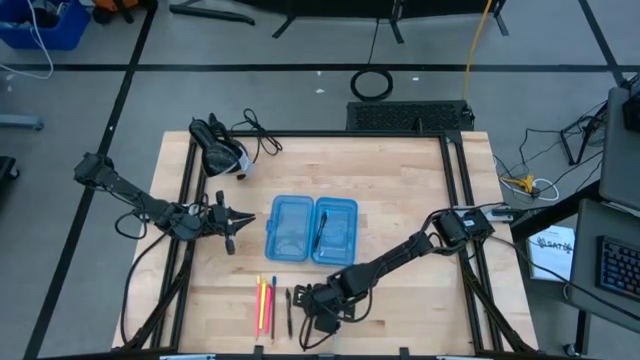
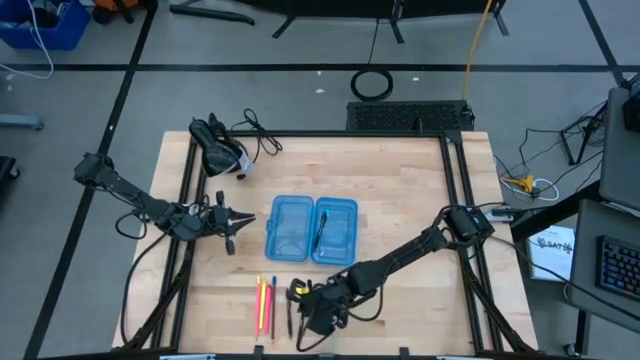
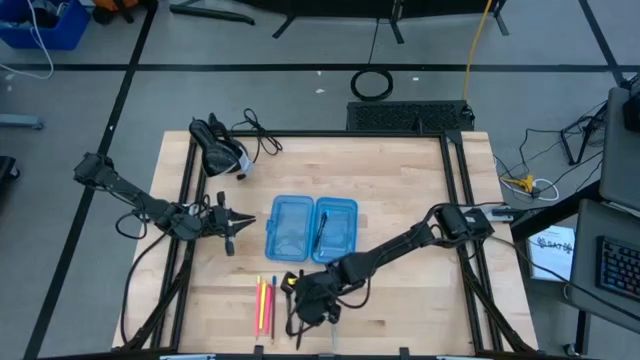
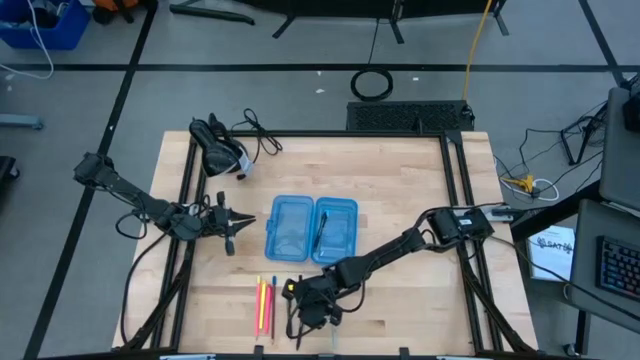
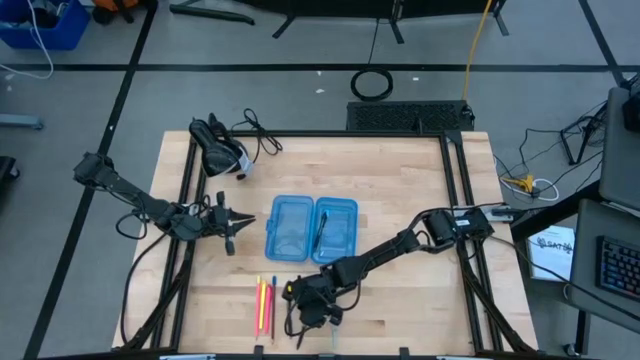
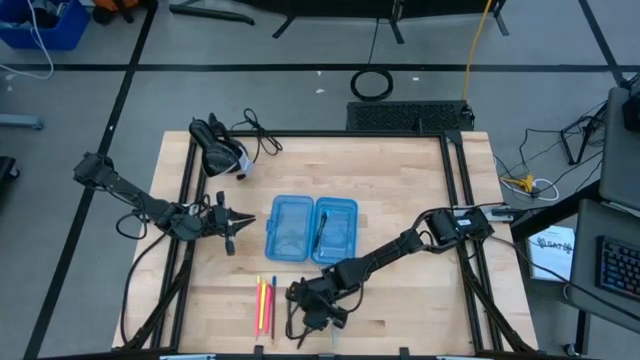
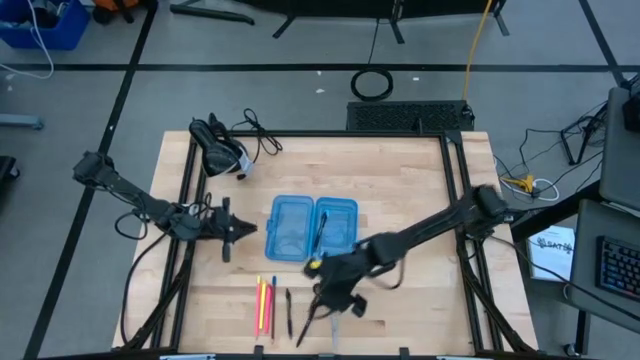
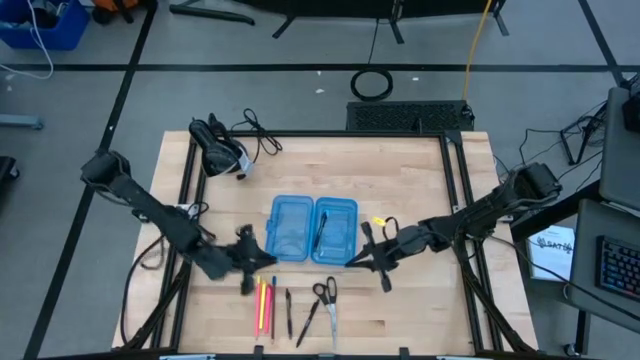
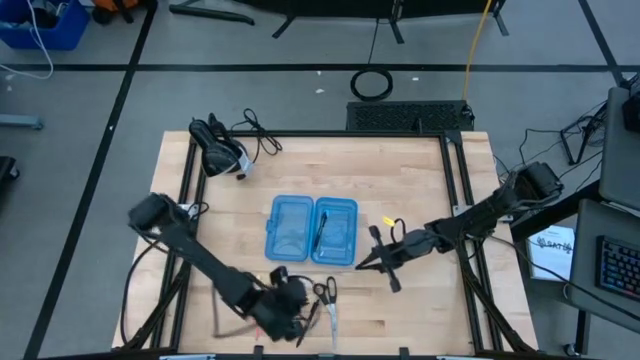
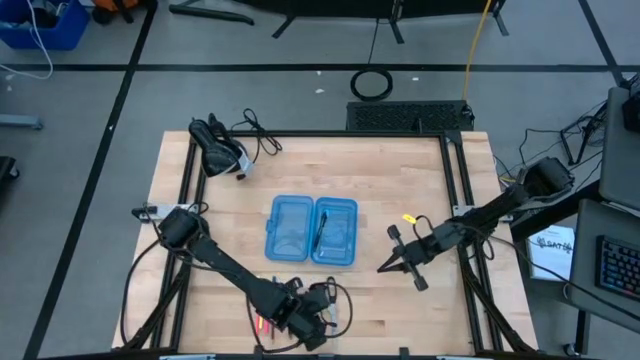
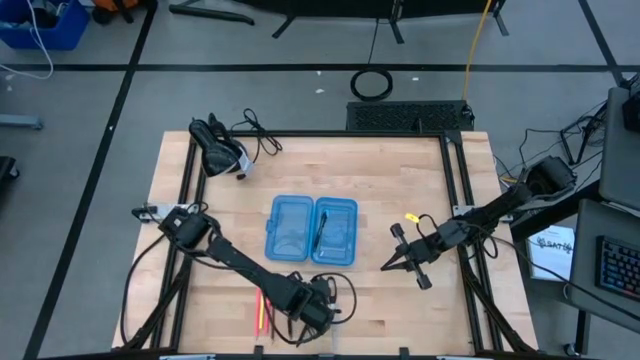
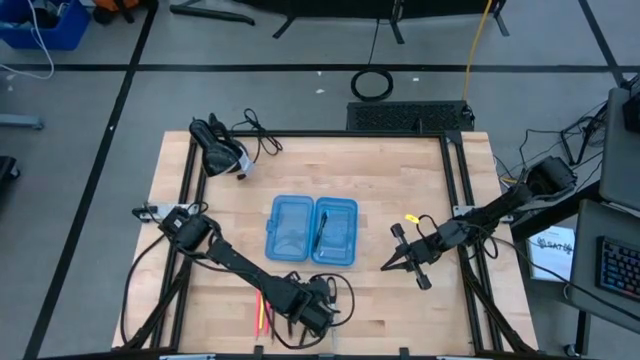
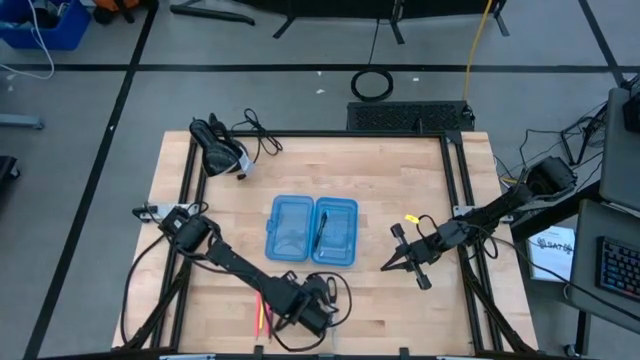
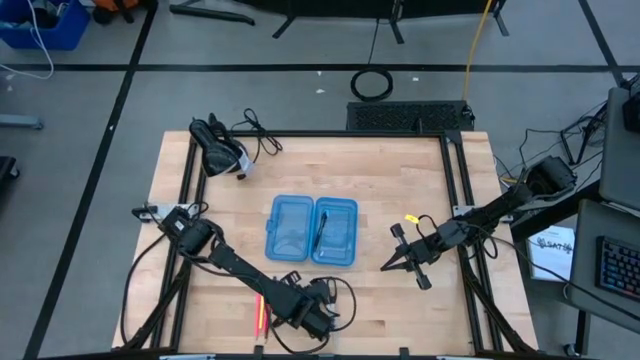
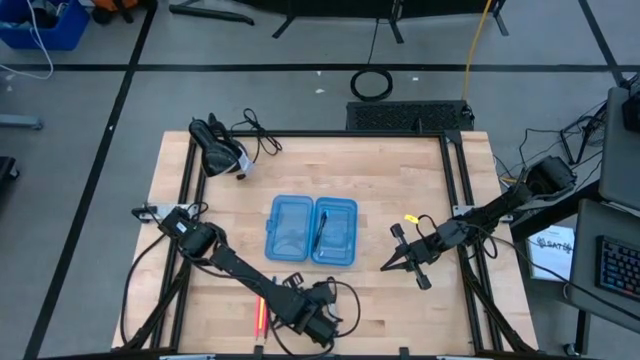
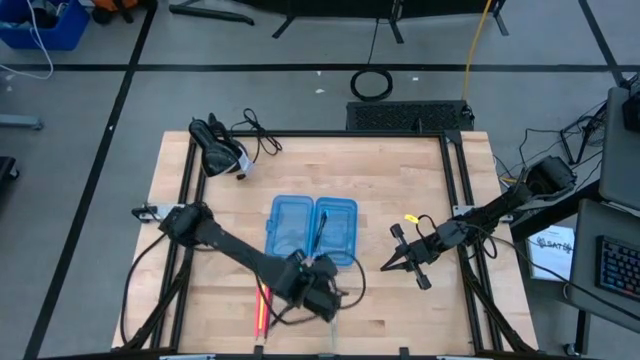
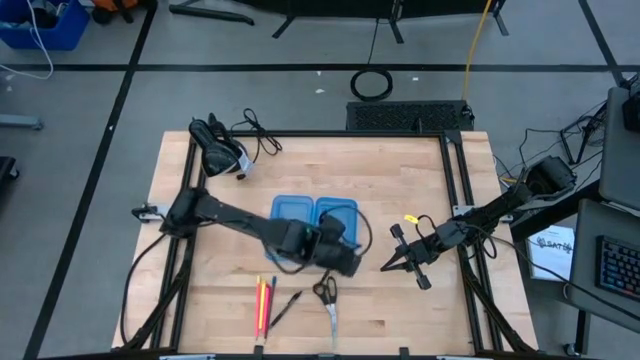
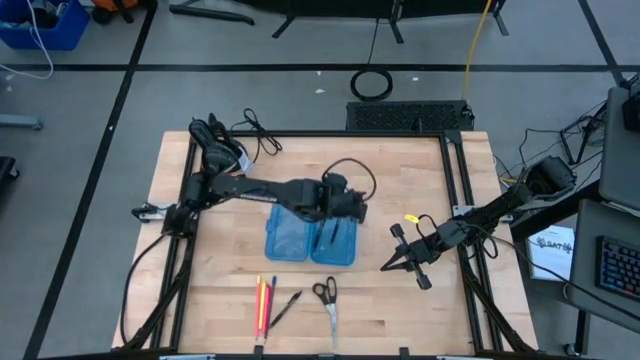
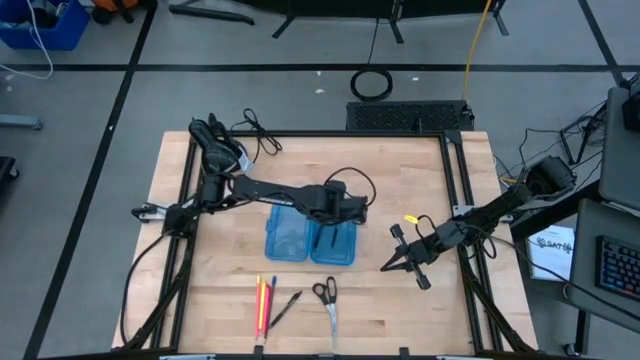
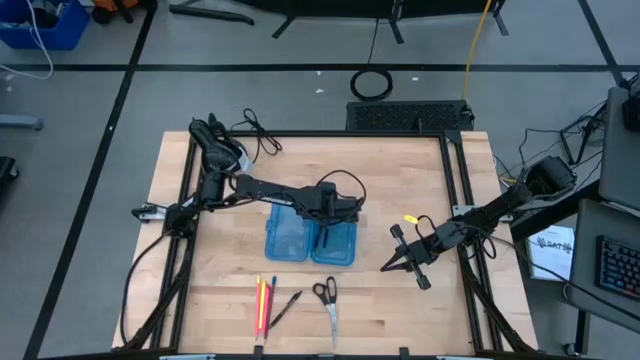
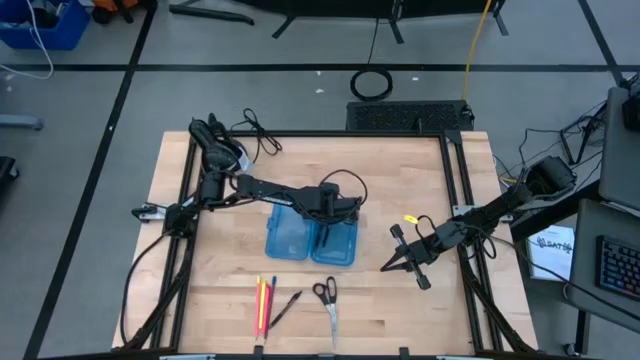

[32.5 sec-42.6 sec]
Task: Pick & place school supplies into a supply box
Put the black pen into the supply box

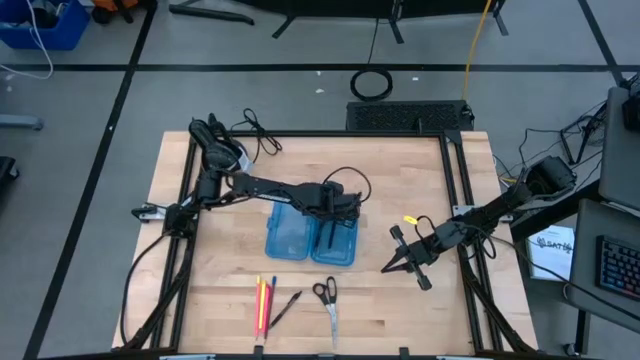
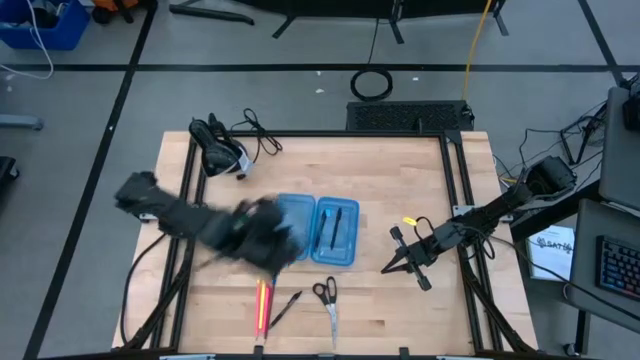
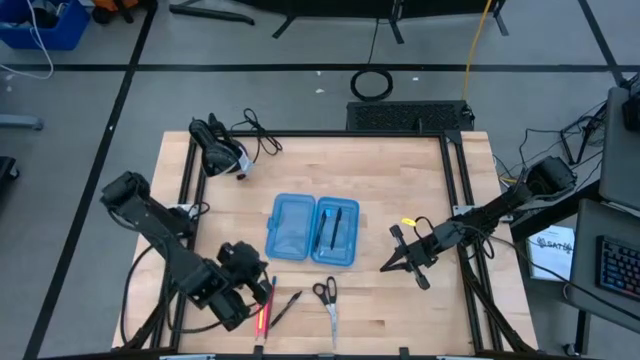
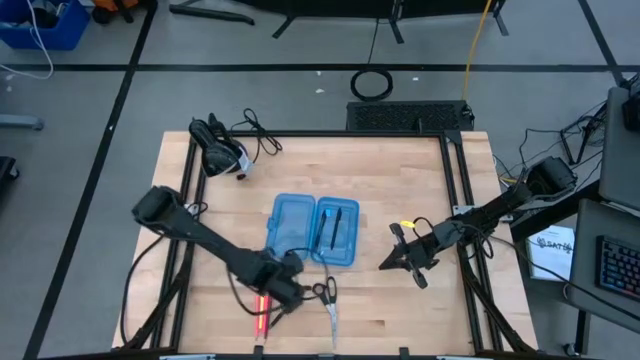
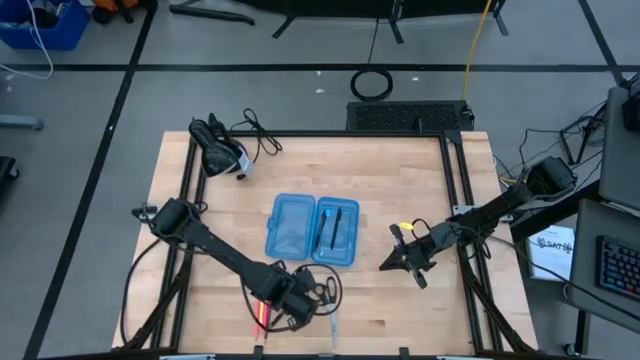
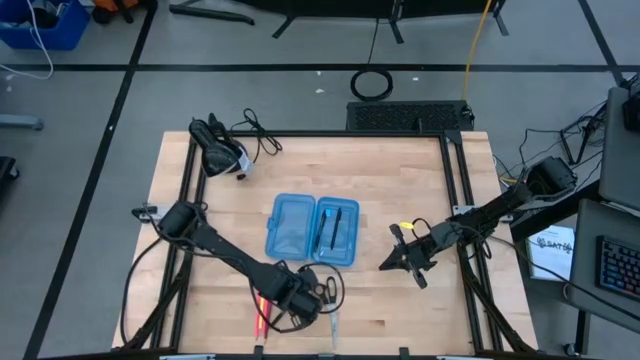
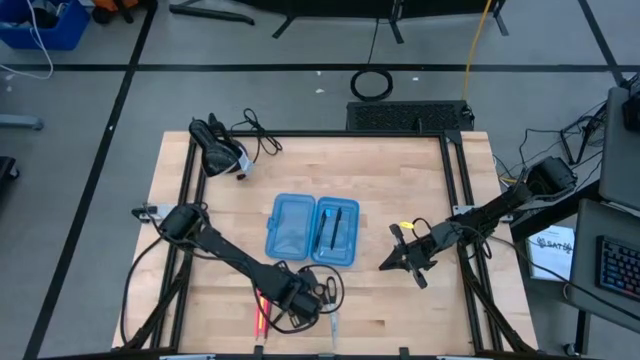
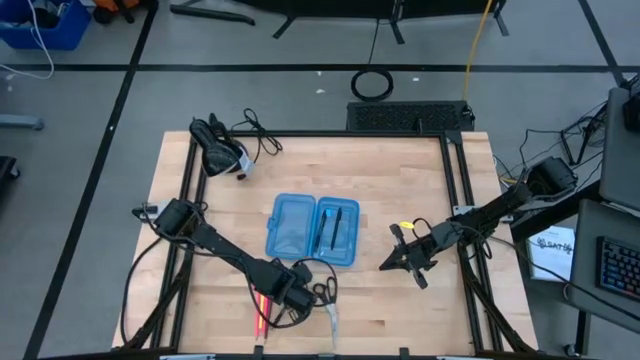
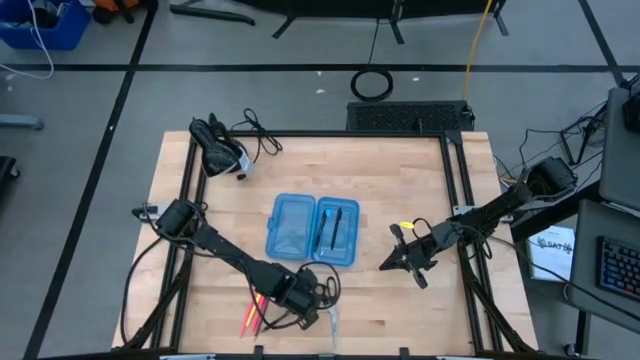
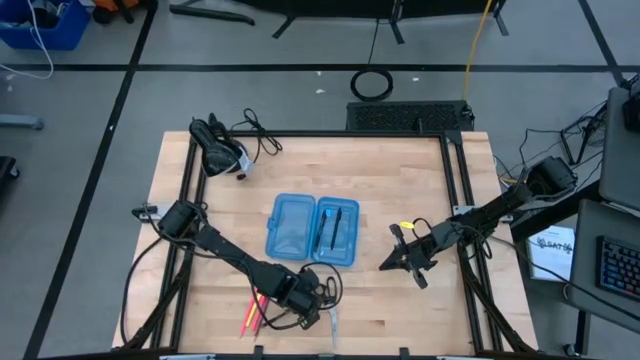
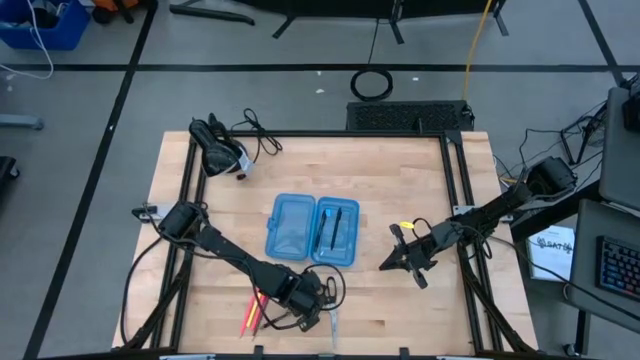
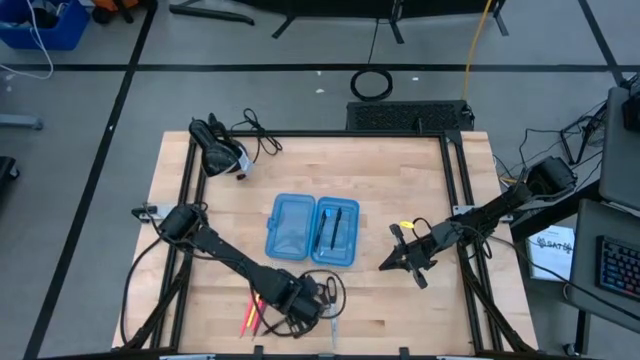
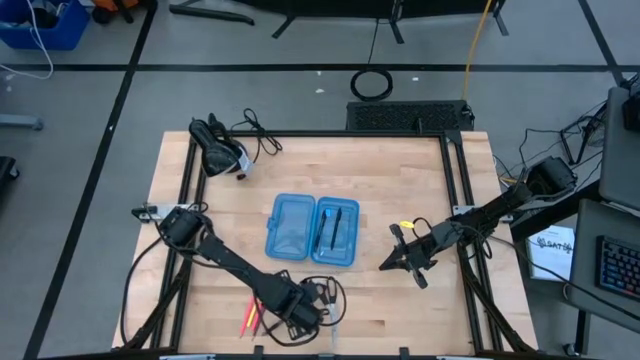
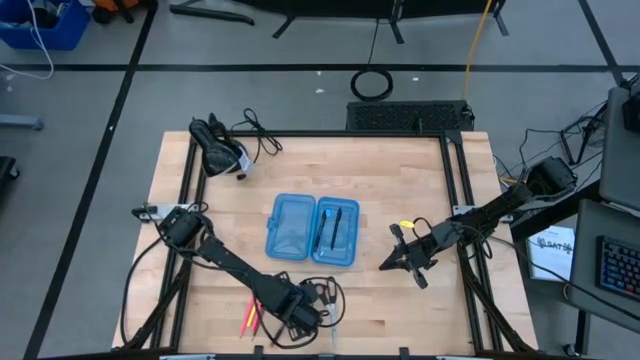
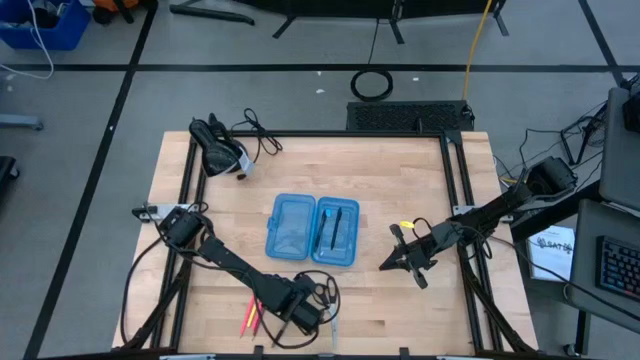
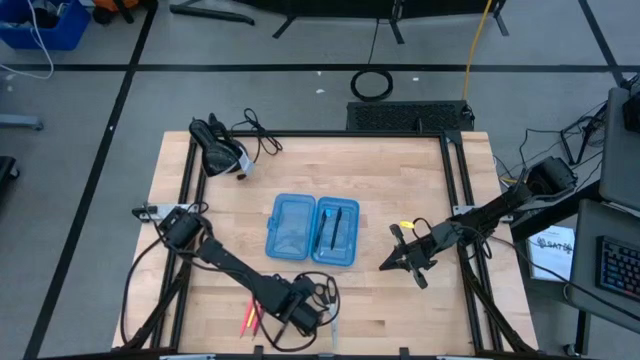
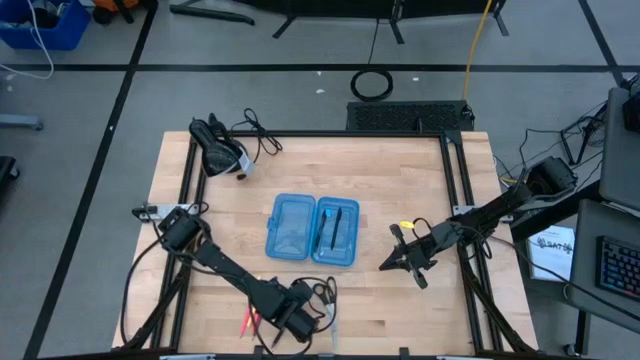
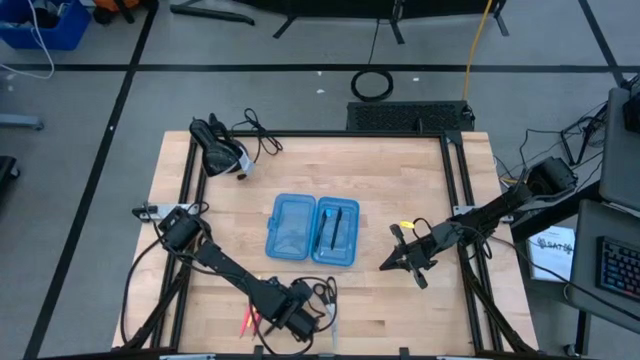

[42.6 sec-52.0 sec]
Put the transparent black pen into the supply box

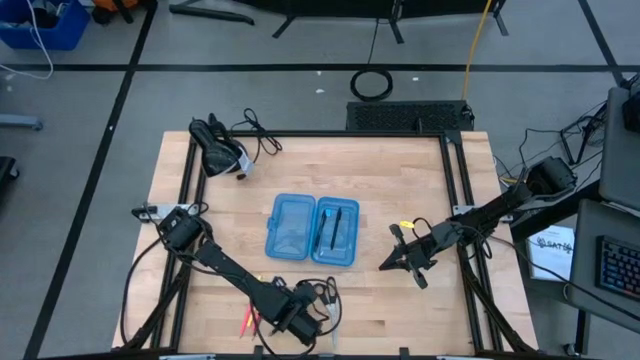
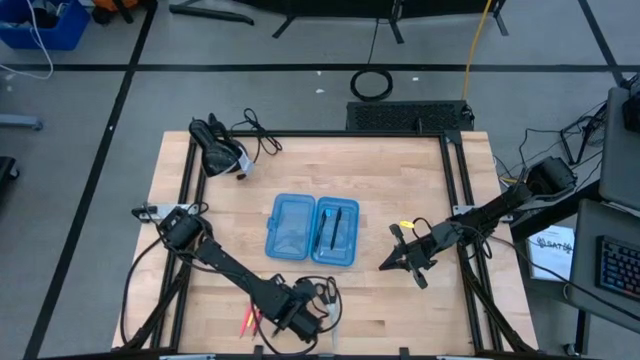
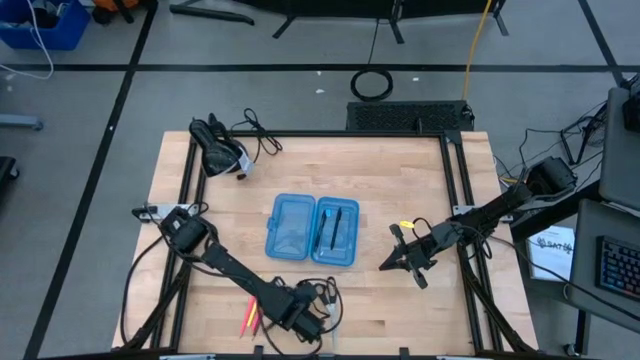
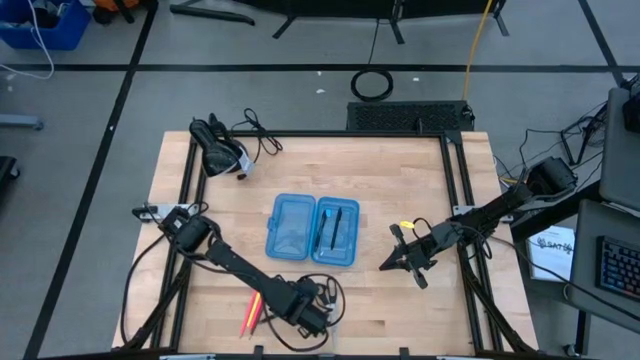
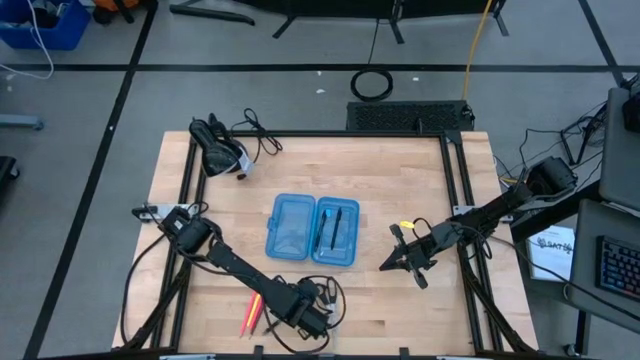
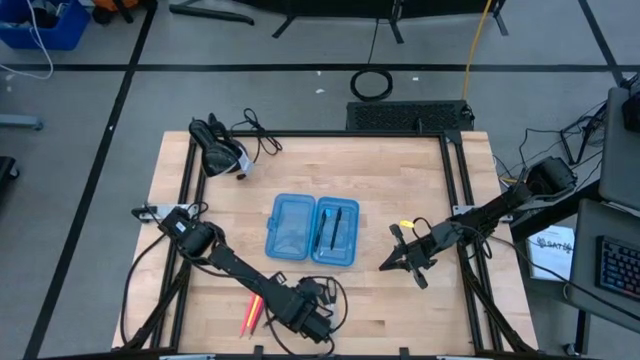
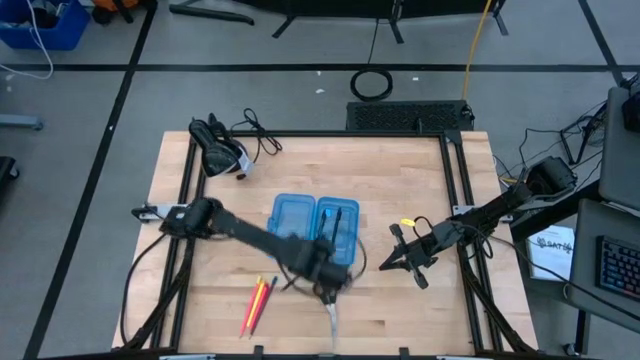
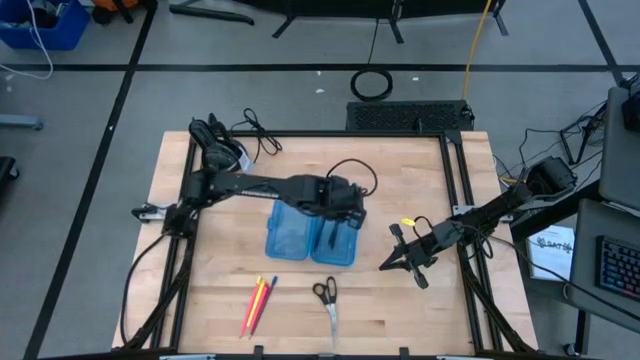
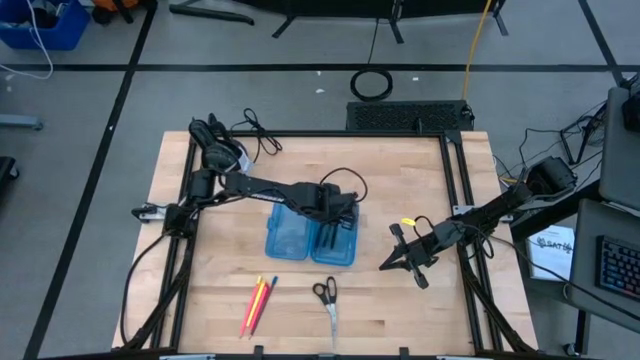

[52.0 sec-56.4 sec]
Put the transparent black pen into the supply box
